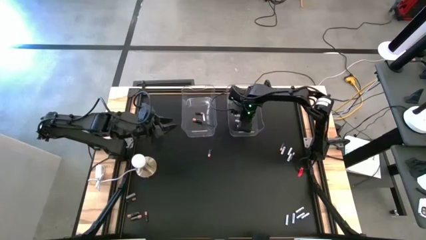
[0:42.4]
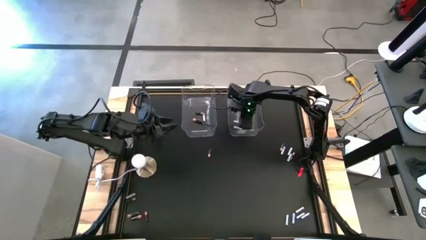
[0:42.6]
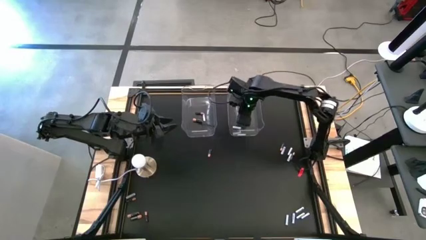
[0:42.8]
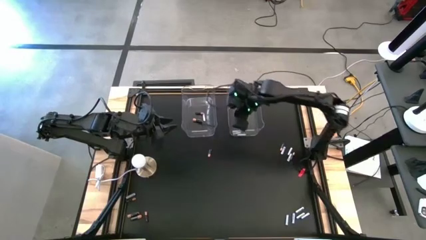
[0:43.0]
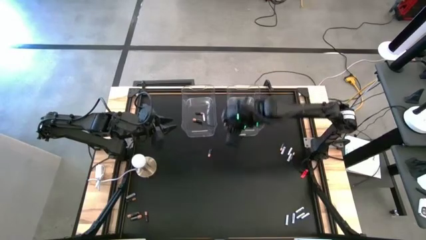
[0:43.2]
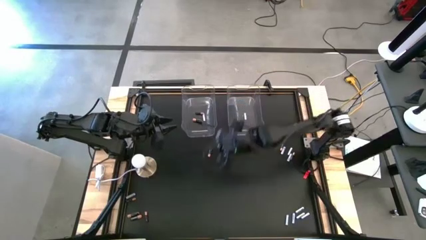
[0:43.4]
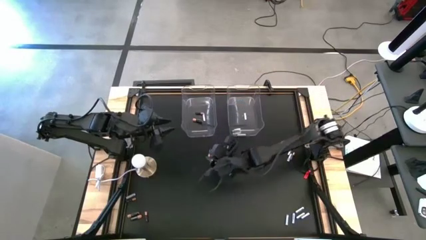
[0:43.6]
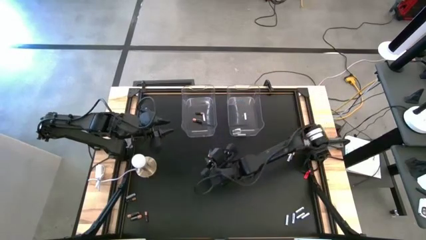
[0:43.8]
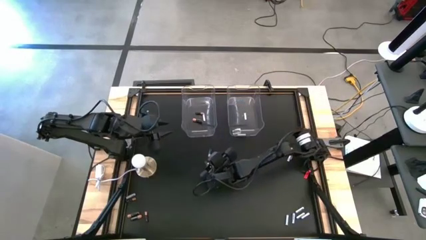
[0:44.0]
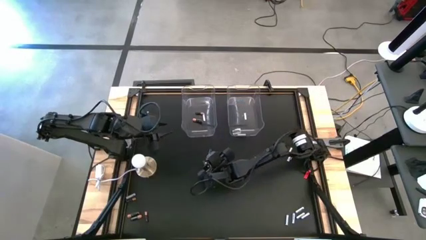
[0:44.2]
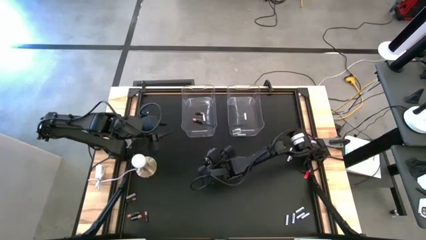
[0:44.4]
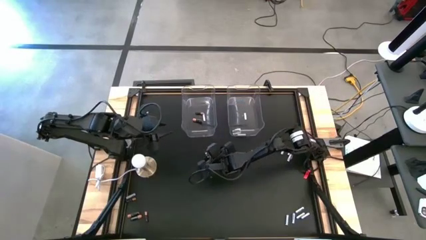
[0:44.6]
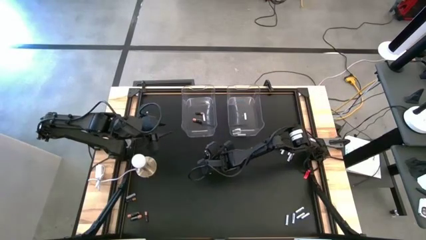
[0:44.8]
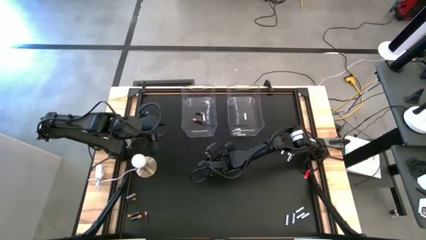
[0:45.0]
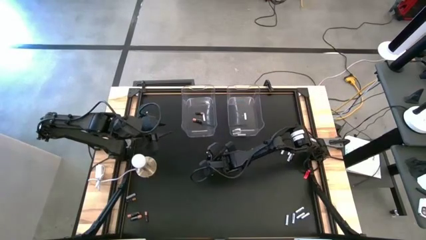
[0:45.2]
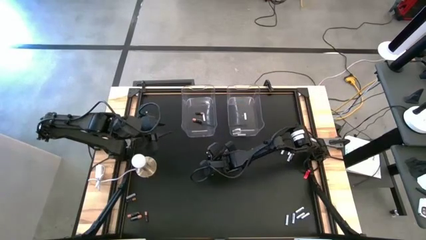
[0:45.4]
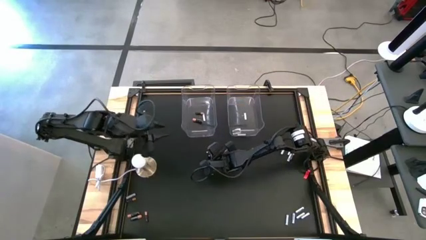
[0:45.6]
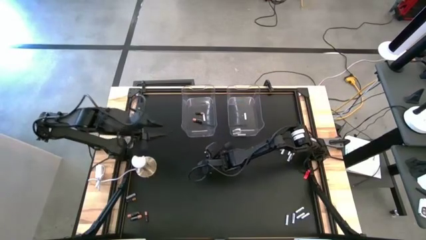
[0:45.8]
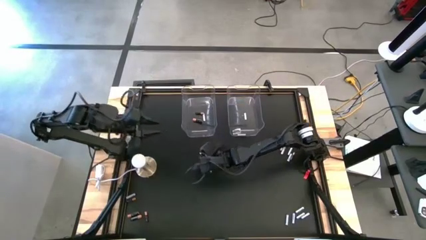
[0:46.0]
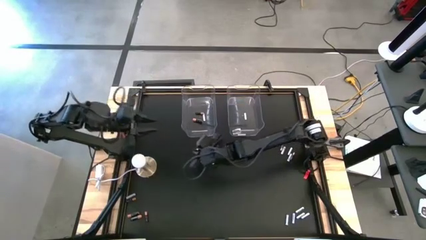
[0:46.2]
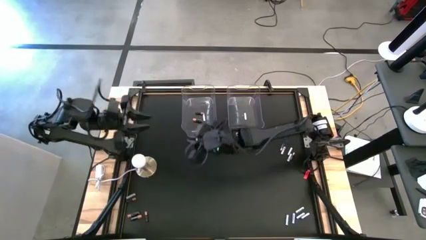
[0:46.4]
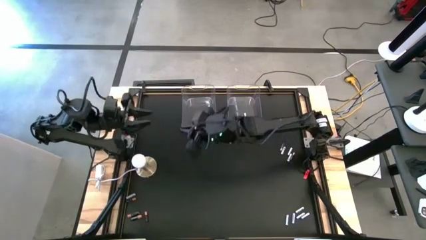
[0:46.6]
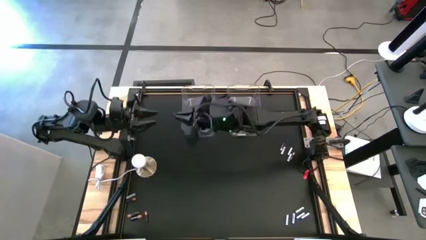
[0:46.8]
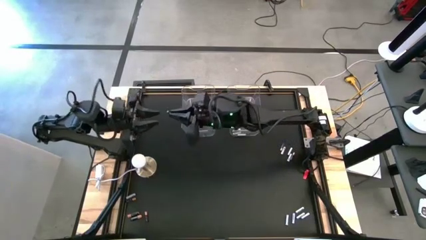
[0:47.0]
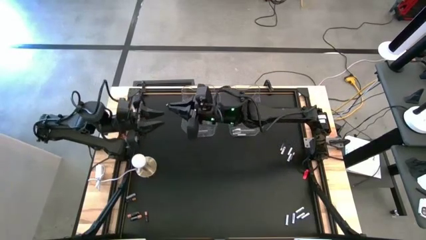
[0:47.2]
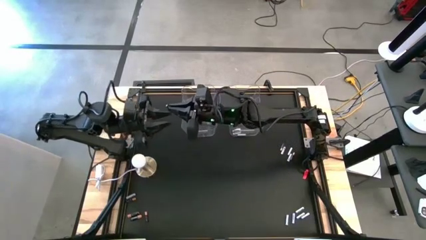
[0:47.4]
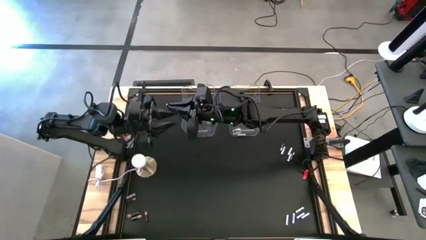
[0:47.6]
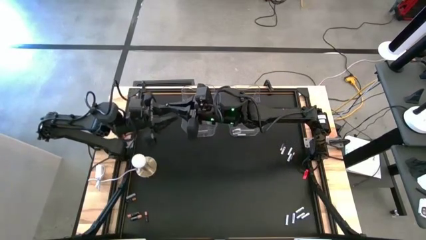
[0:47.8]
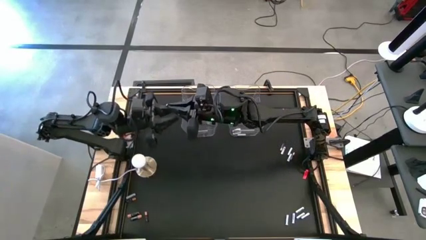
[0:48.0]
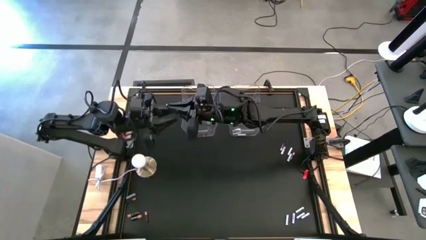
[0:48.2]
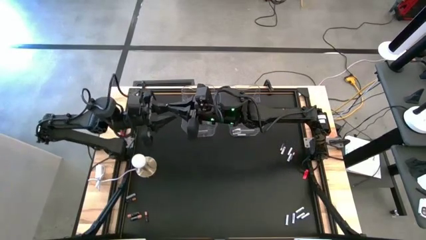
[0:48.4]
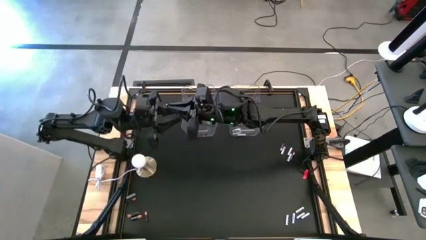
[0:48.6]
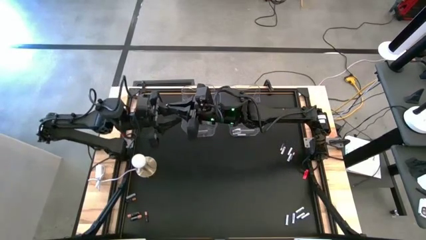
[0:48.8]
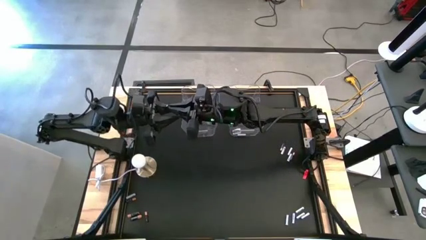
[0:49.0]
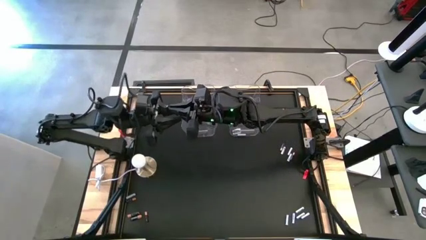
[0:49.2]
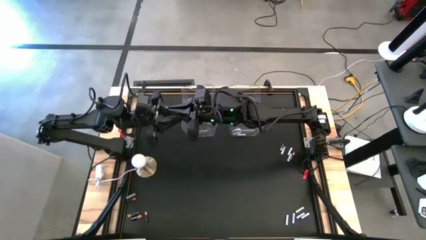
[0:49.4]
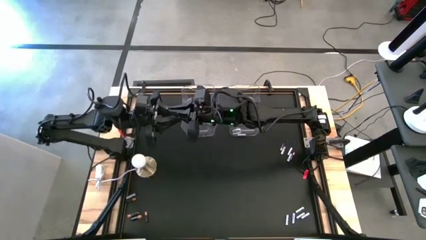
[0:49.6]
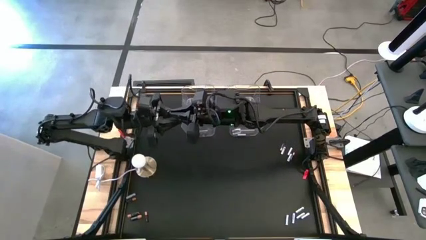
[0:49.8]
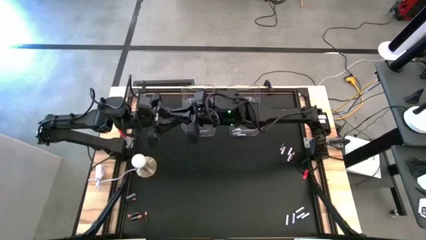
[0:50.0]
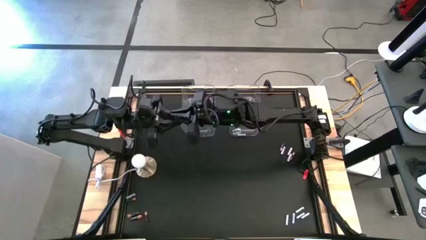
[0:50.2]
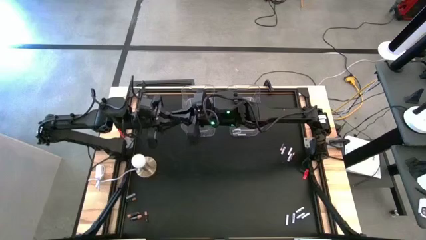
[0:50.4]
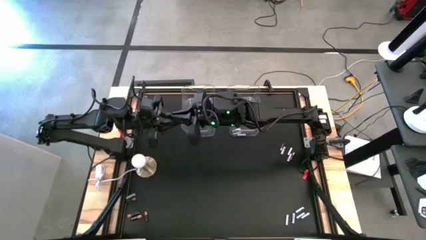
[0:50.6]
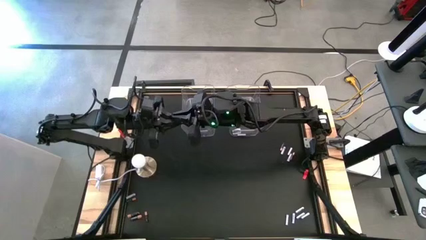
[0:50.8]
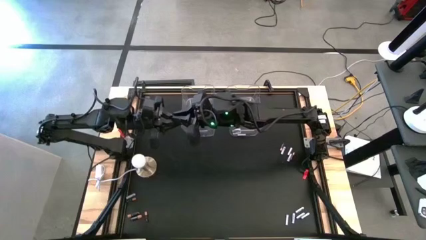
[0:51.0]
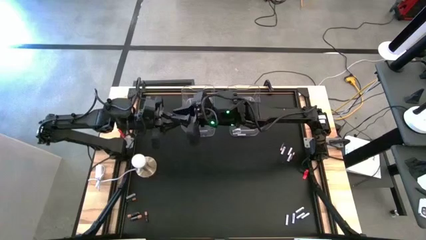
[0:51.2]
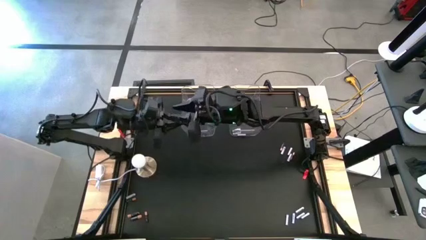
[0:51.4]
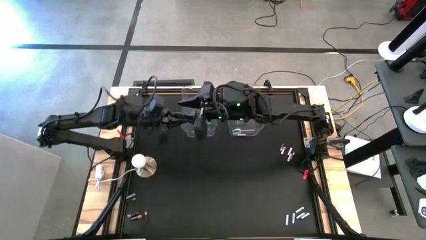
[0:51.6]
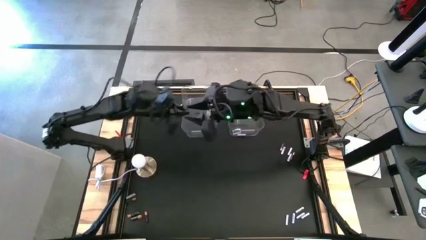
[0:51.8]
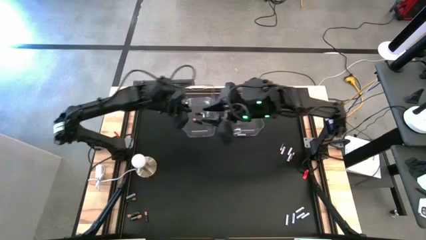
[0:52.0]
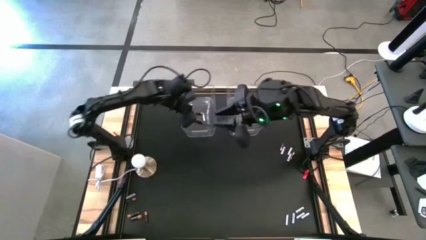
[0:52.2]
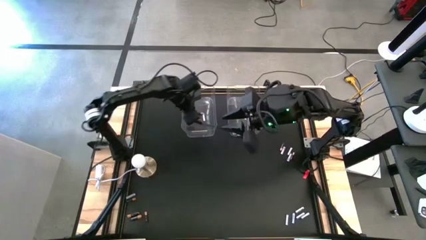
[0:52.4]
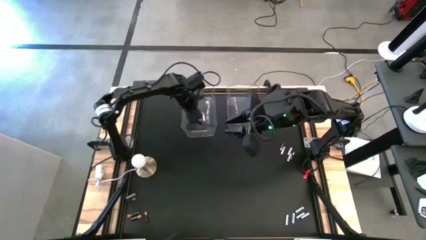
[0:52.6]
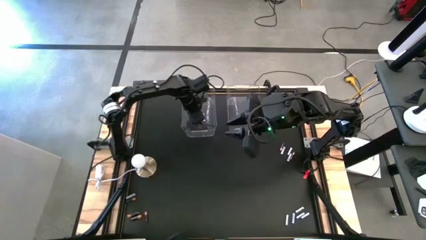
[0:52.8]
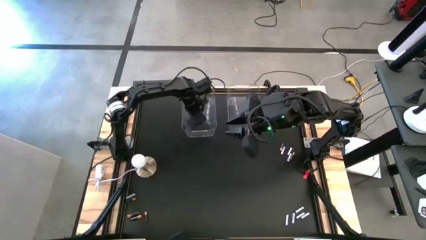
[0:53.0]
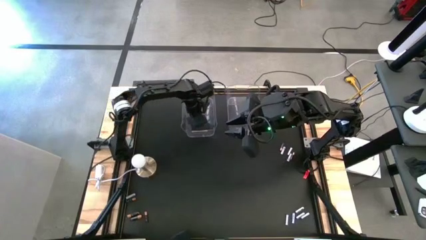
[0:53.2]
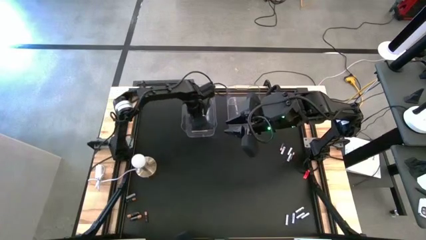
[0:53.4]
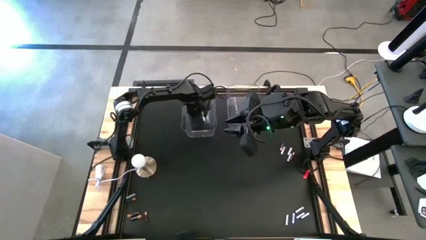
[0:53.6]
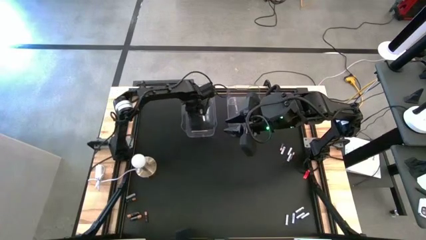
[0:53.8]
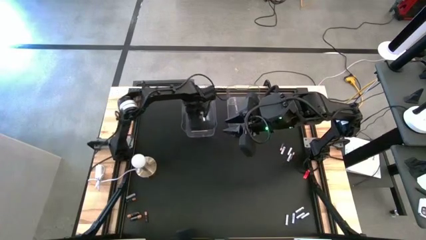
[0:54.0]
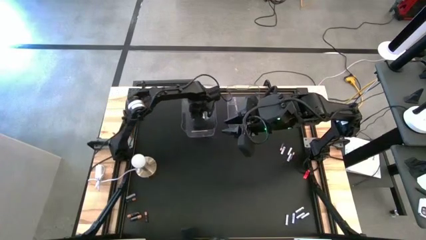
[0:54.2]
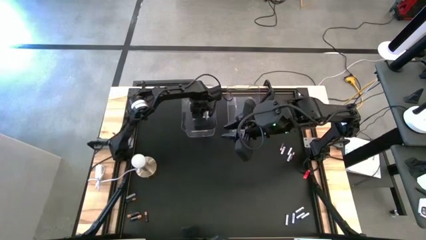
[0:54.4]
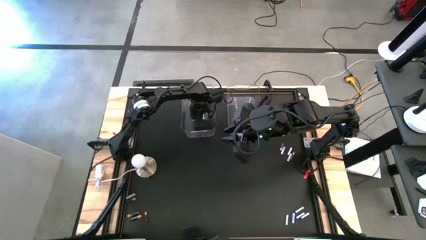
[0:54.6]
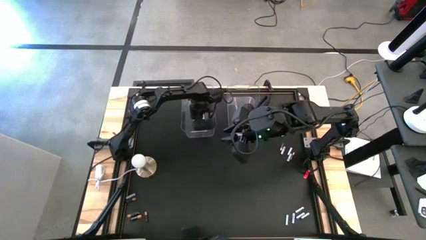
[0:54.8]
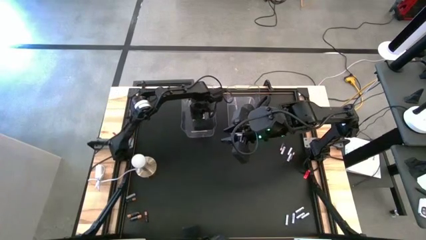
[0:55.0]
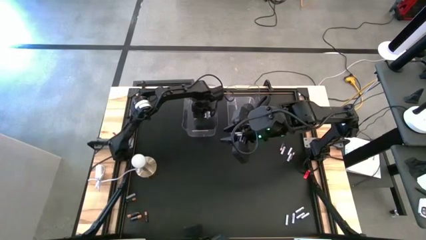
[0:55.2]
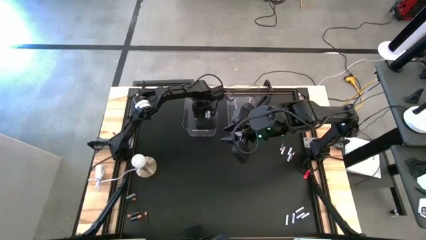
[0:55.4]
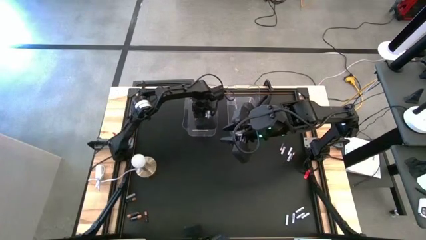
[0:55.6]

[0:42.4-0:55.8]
Task: Sort batteries
Put the black battery into the left transparent bin
